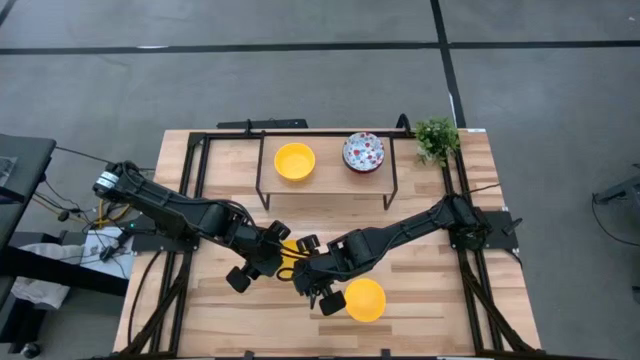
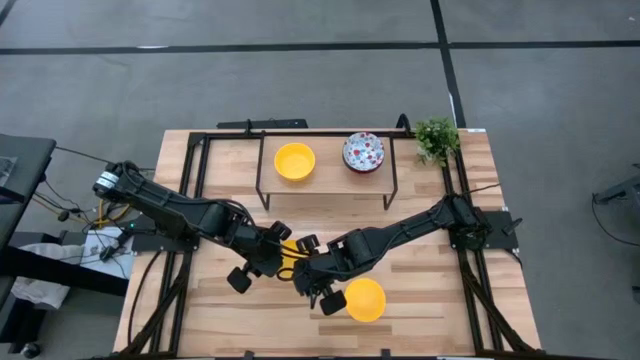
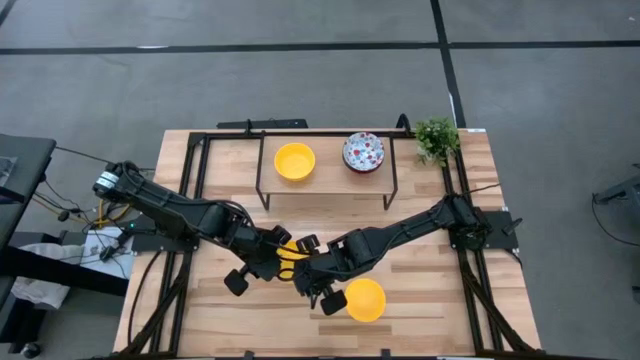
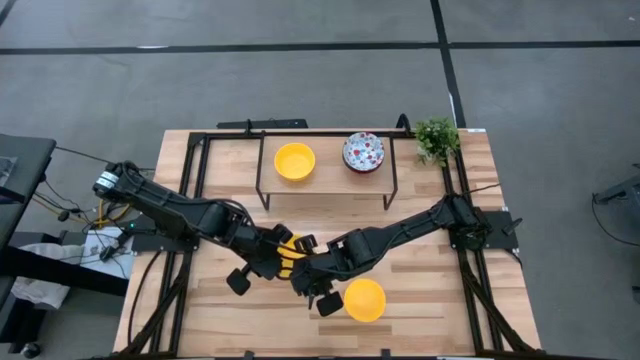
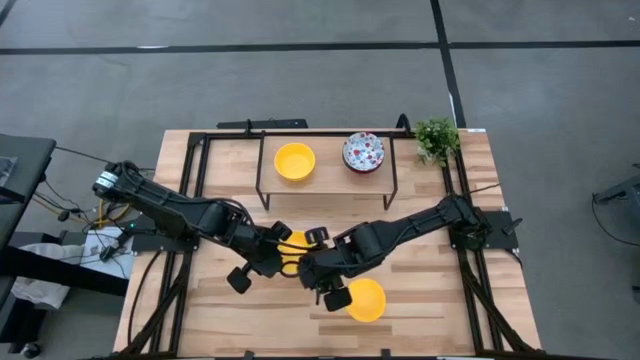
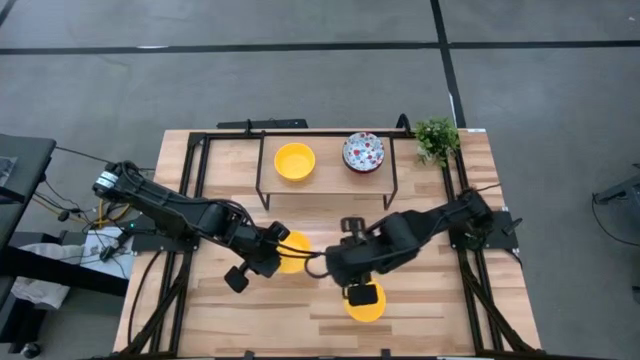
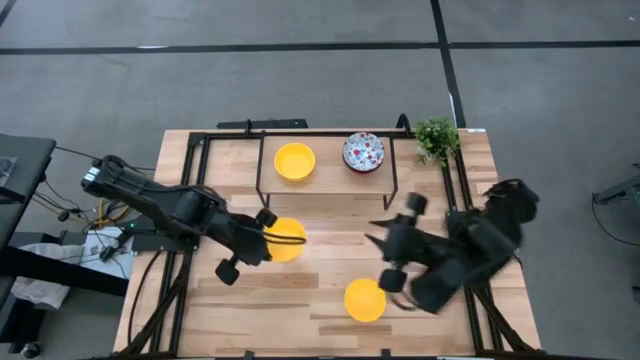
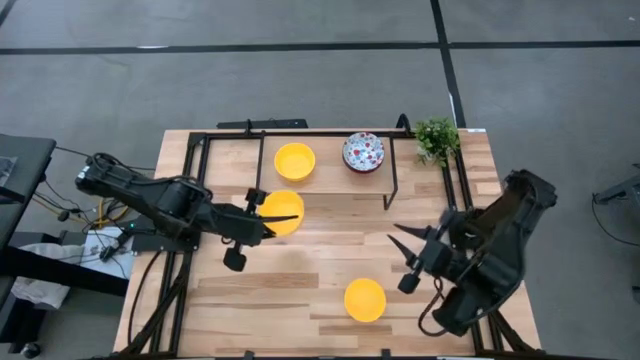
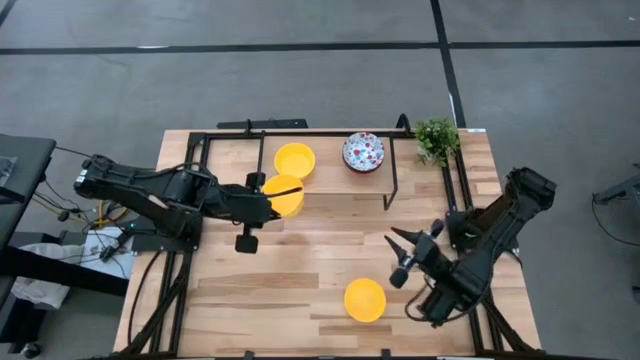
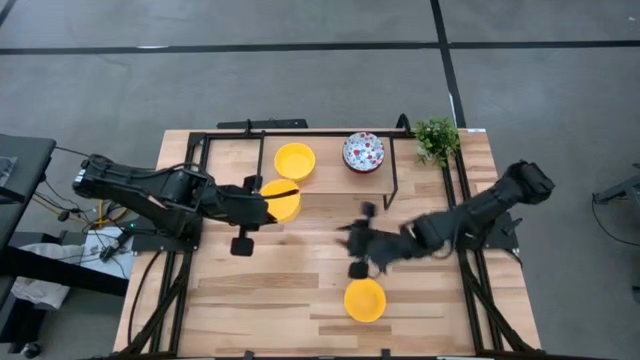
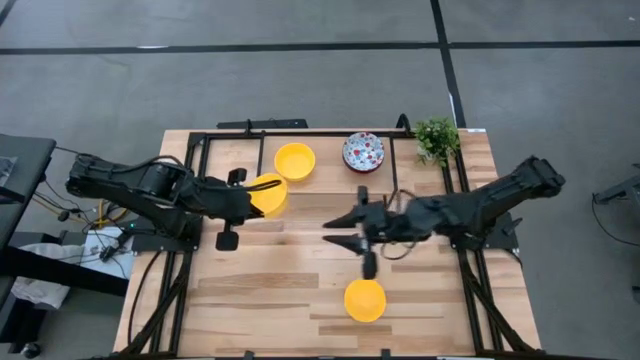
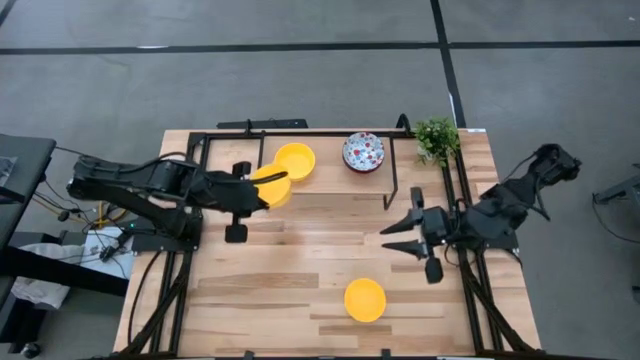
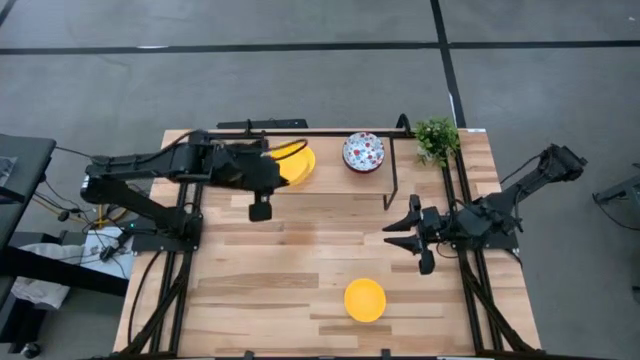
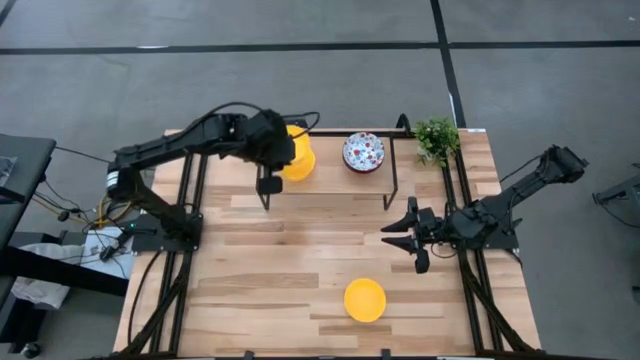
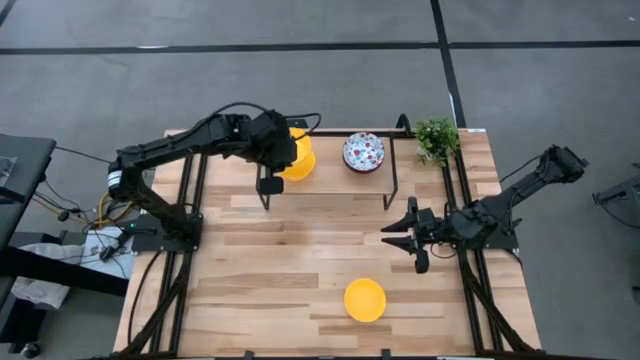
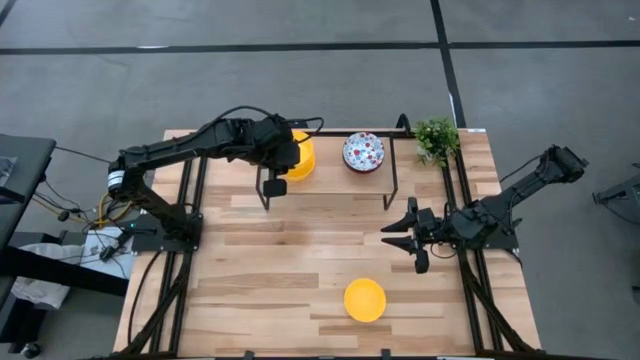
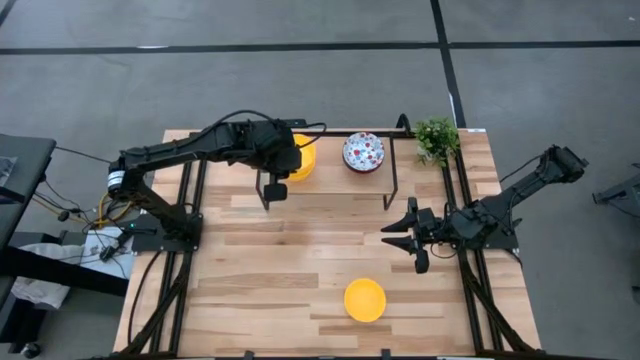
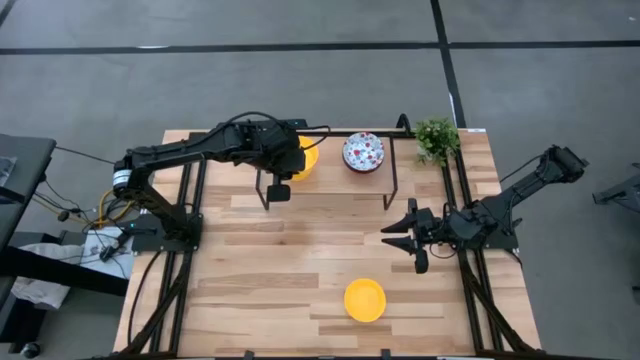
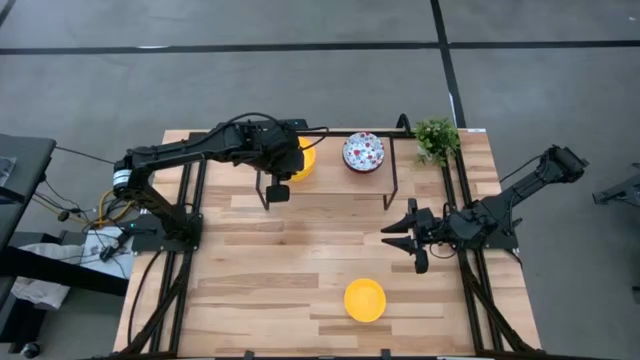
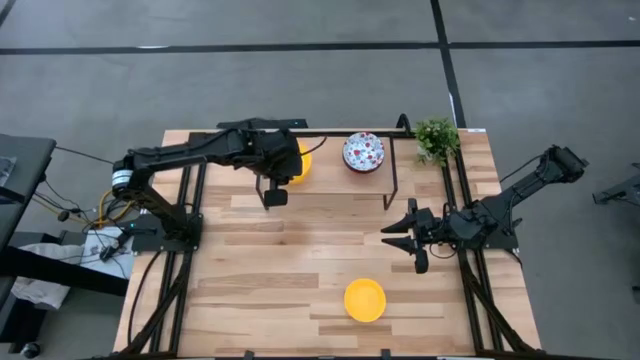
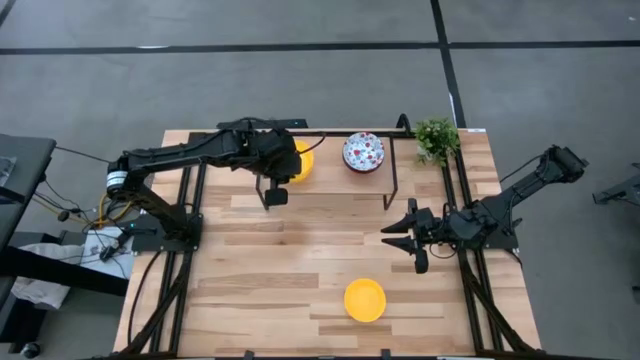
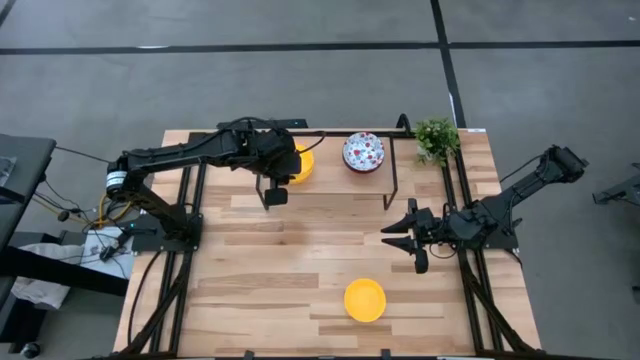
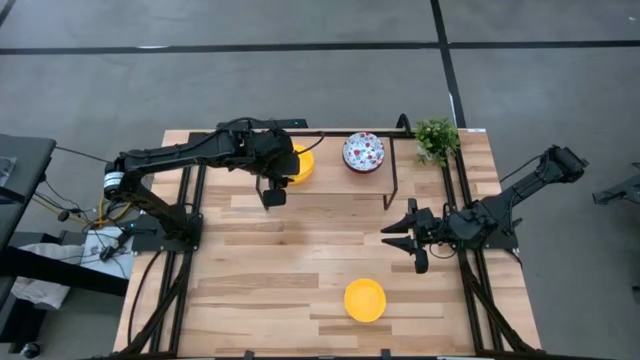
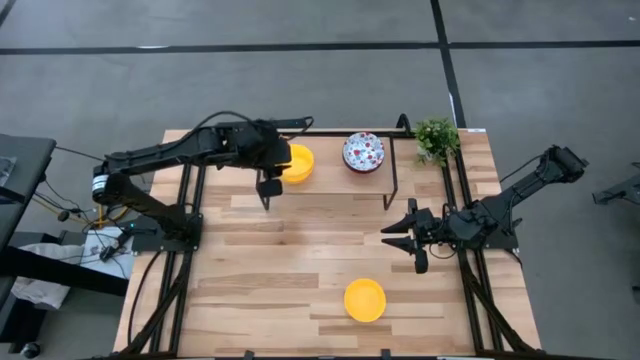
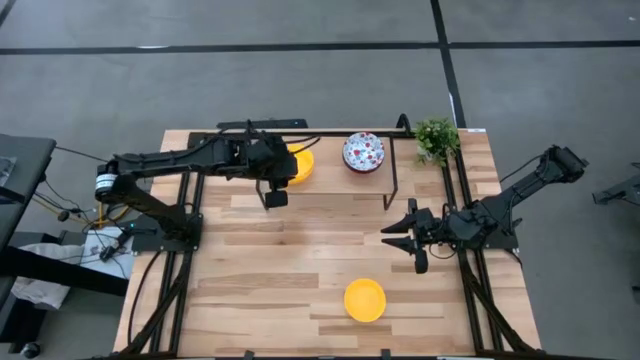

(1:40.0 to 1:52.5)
Task: Pick & Place Mini bowls
Stack the top yellow bowl on top of the yellow bowl on the shelf

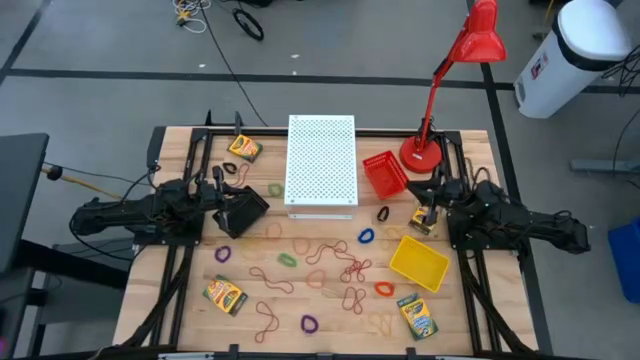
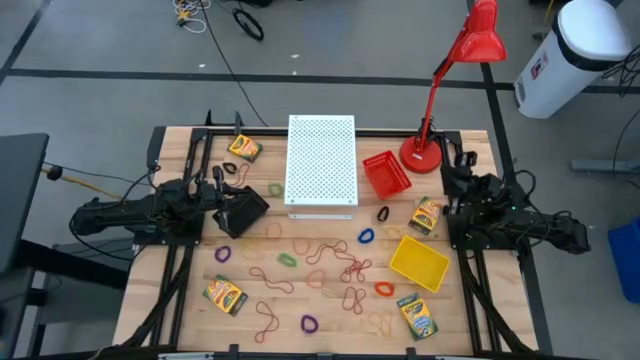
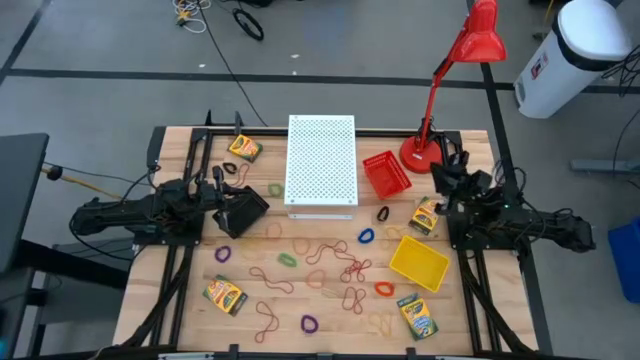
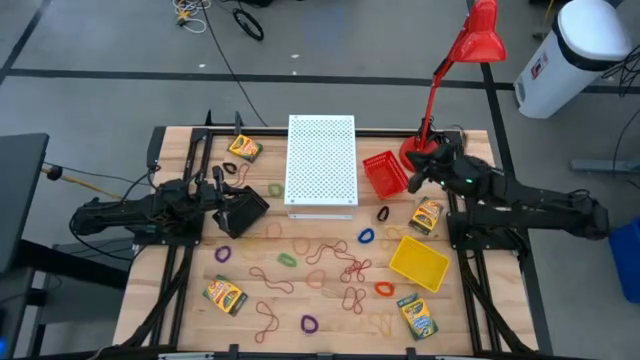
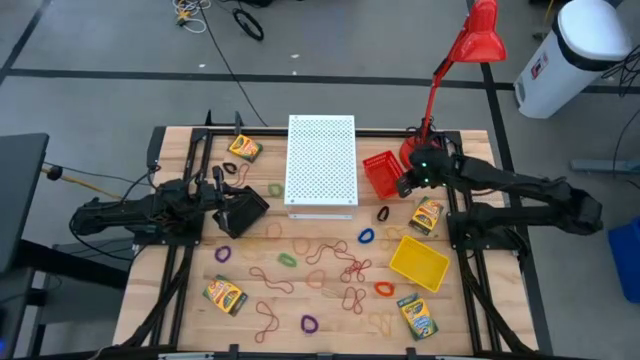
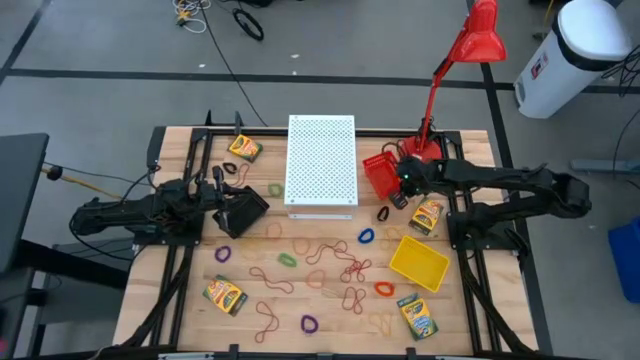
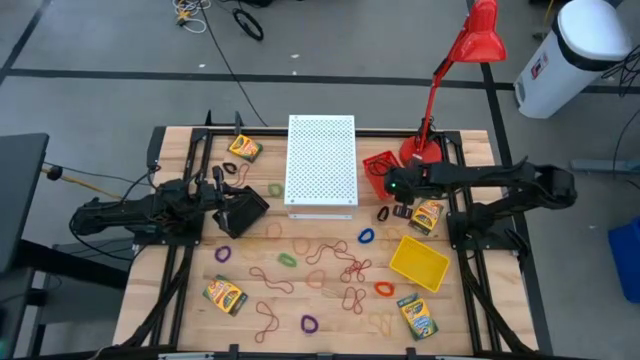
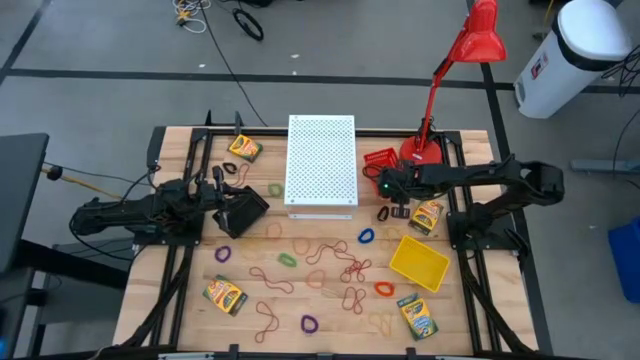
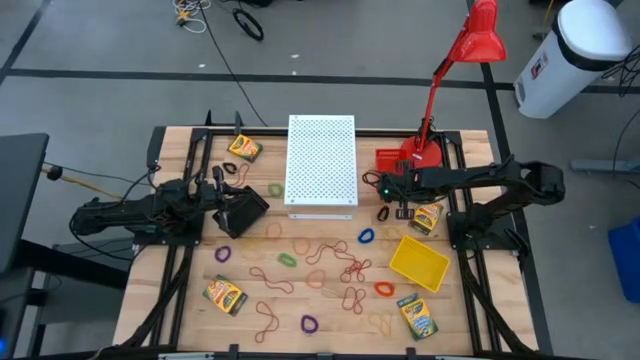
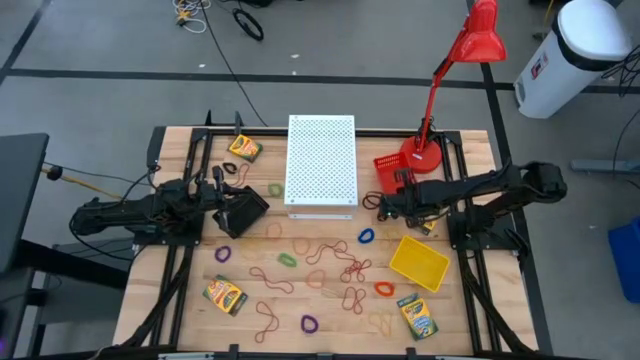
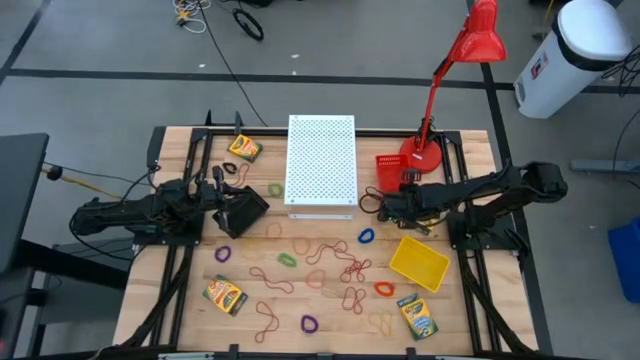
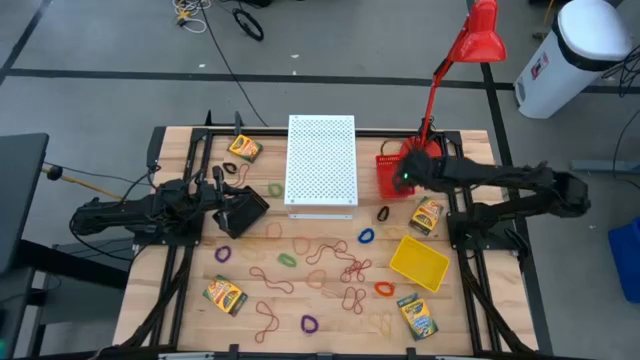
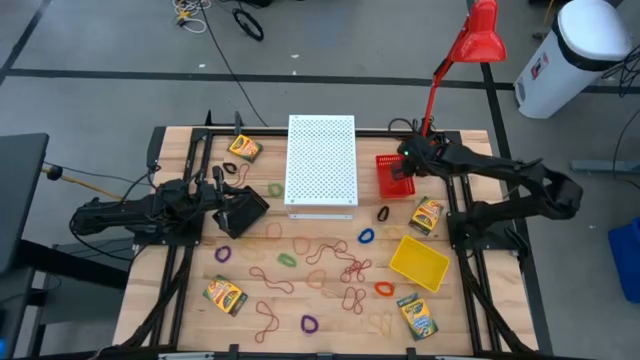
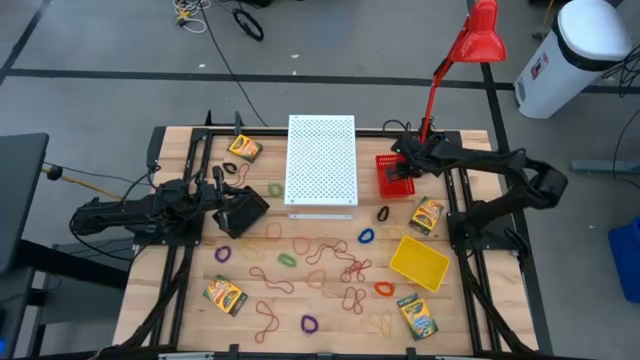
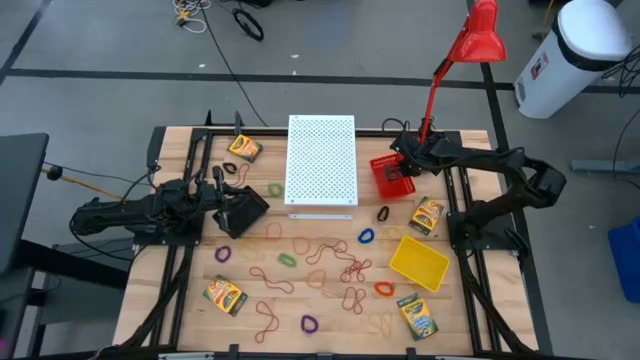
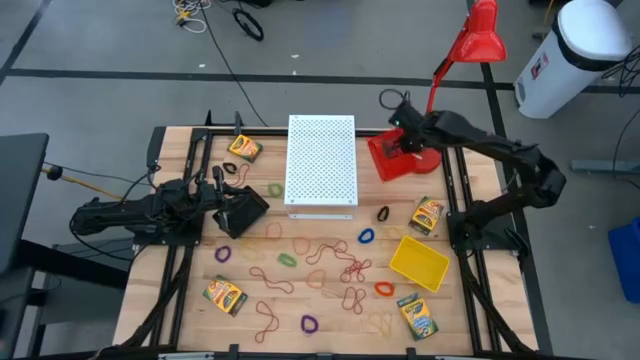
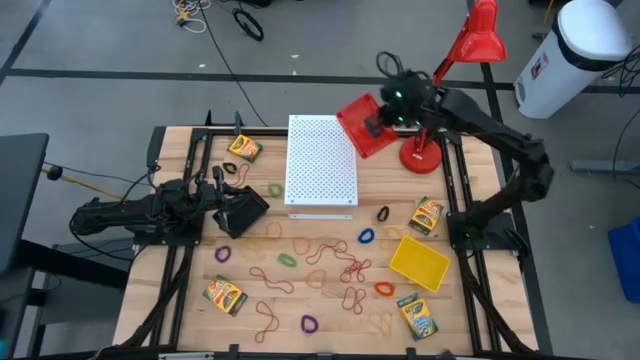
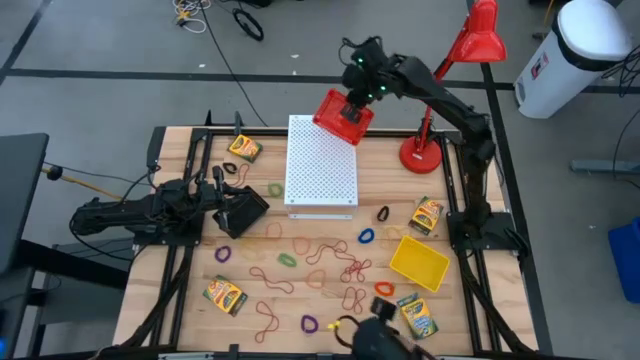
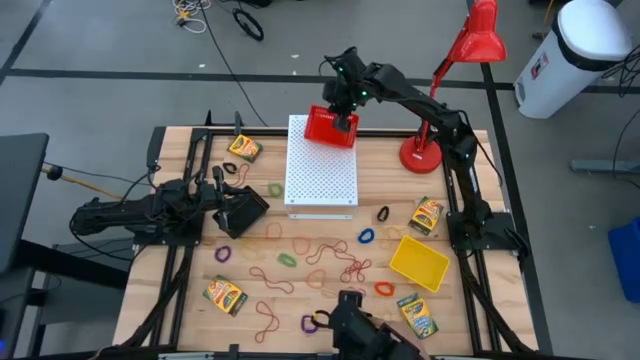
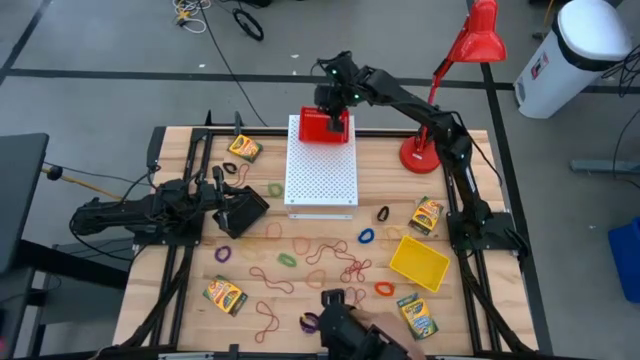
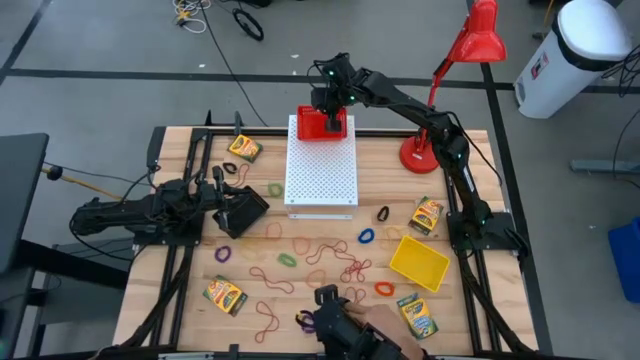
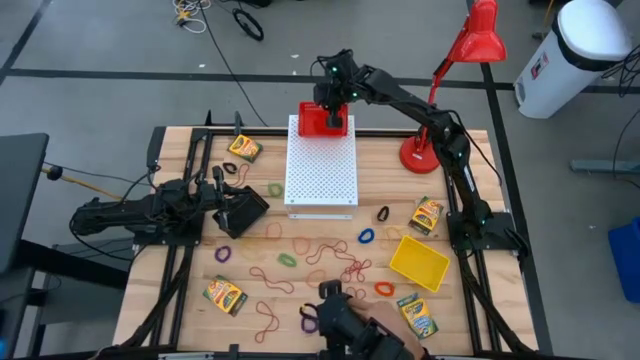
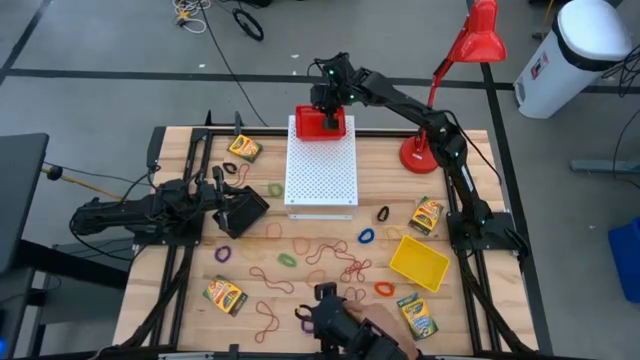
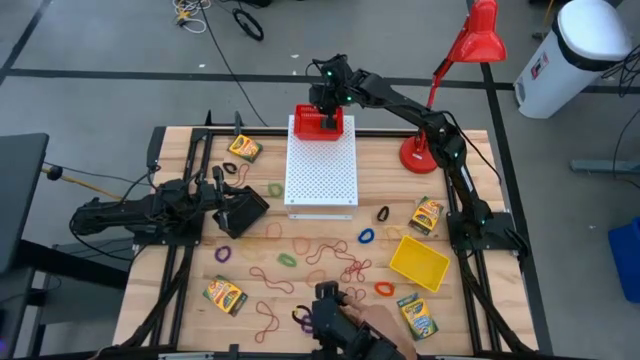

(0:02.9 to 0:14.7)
Task: Pick & Place Office Desk Supplies
Put the red bin on the shelf
